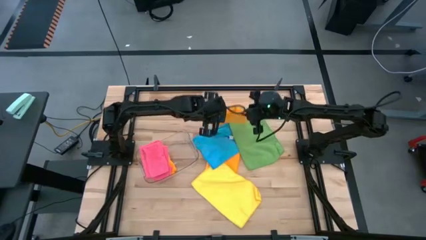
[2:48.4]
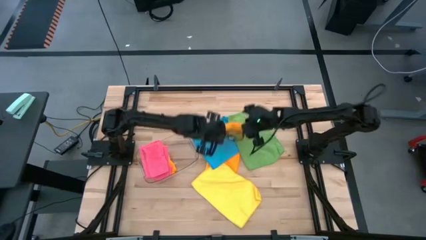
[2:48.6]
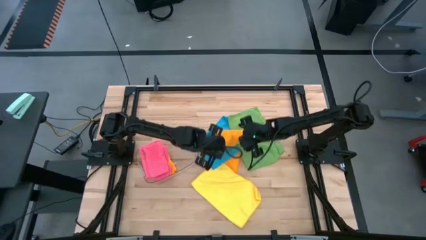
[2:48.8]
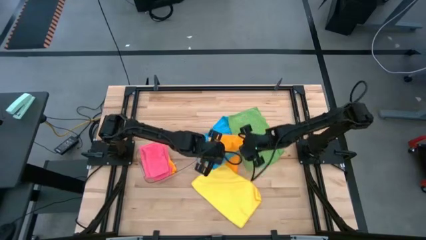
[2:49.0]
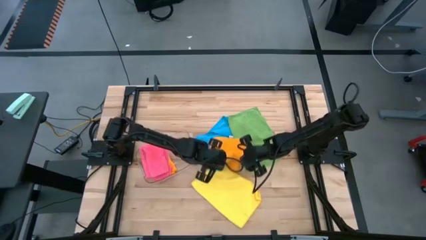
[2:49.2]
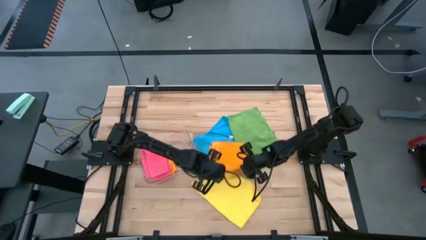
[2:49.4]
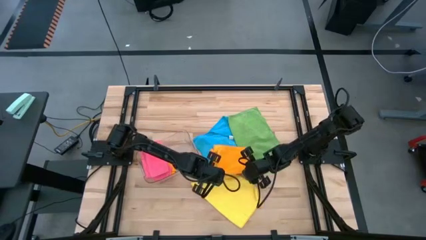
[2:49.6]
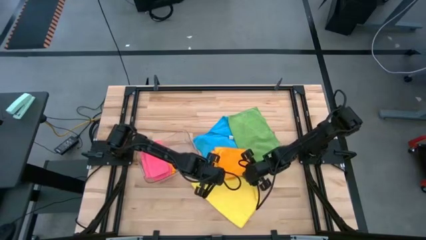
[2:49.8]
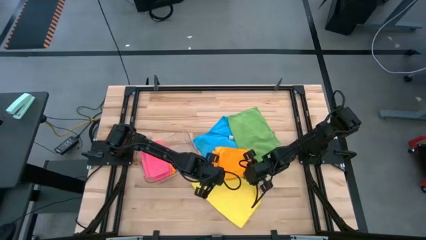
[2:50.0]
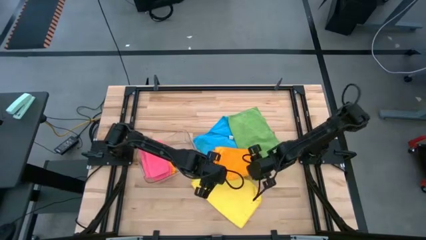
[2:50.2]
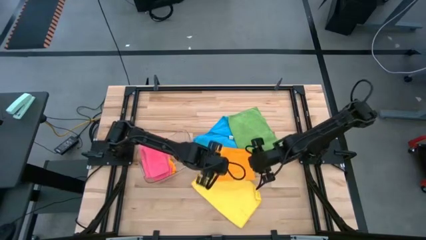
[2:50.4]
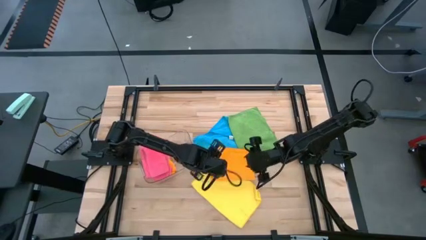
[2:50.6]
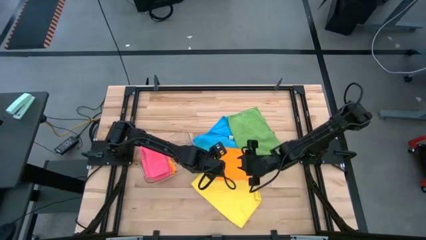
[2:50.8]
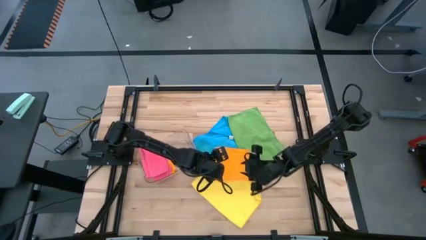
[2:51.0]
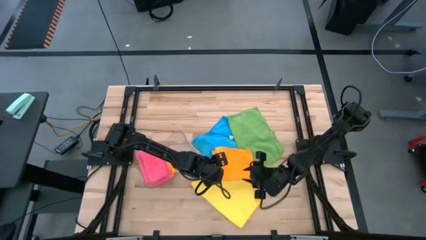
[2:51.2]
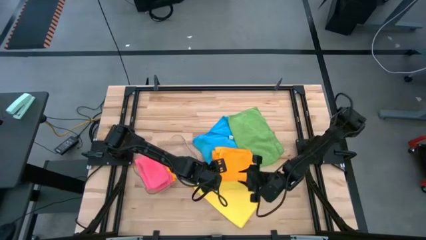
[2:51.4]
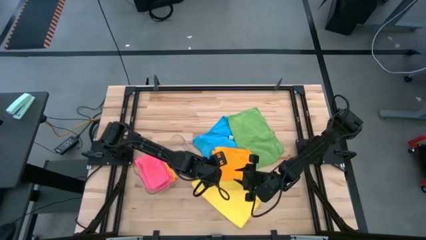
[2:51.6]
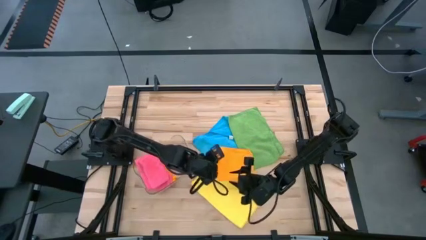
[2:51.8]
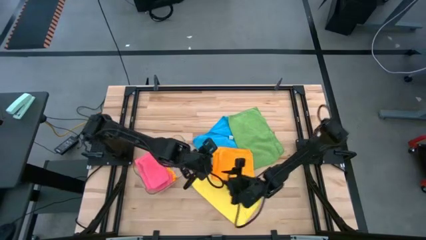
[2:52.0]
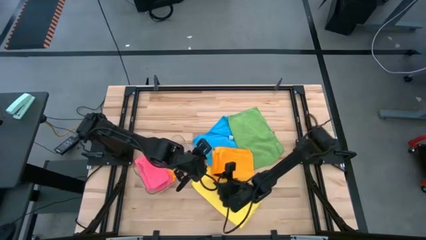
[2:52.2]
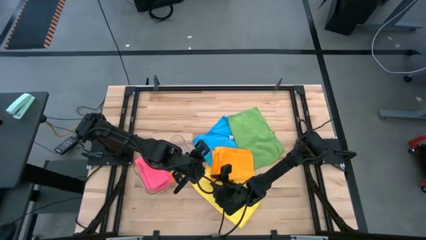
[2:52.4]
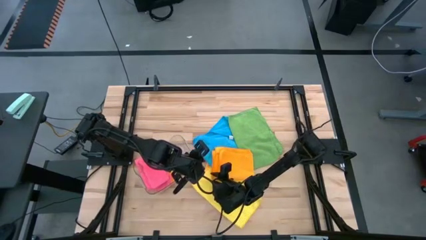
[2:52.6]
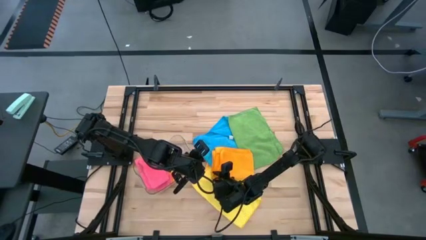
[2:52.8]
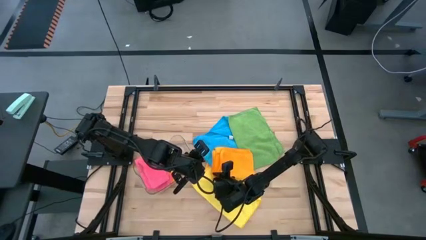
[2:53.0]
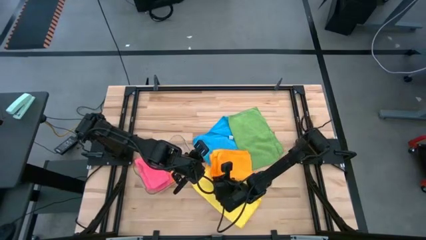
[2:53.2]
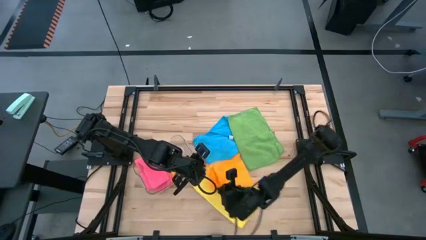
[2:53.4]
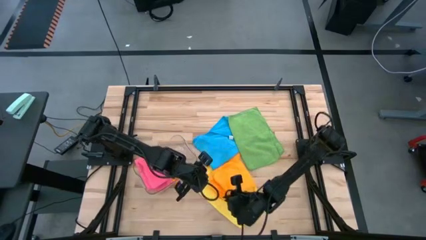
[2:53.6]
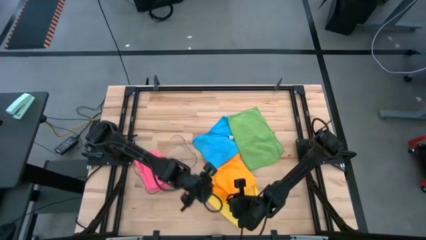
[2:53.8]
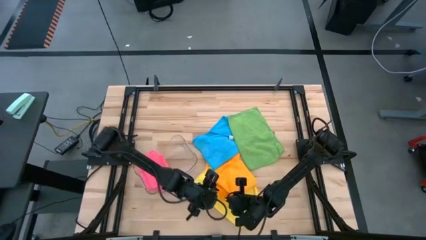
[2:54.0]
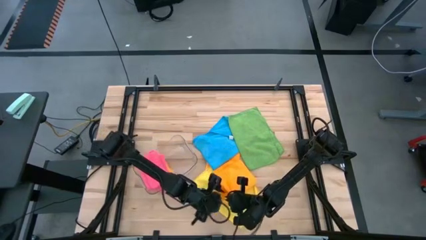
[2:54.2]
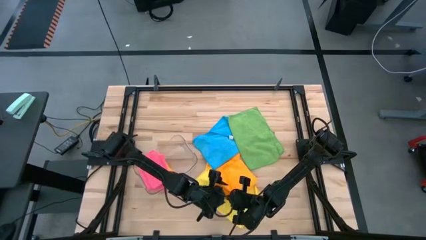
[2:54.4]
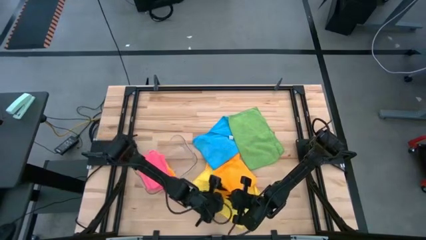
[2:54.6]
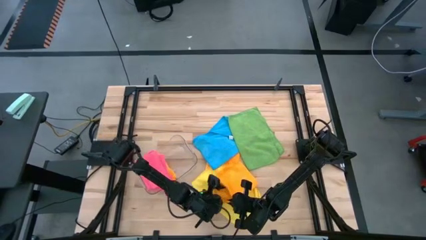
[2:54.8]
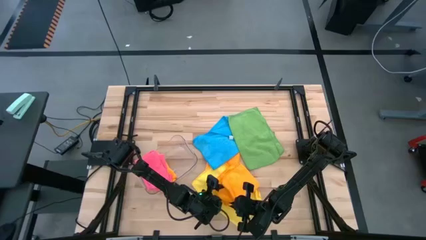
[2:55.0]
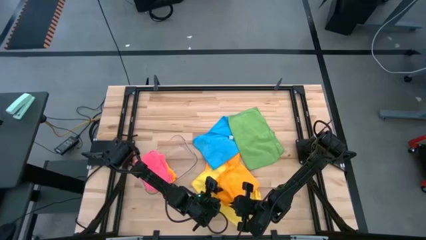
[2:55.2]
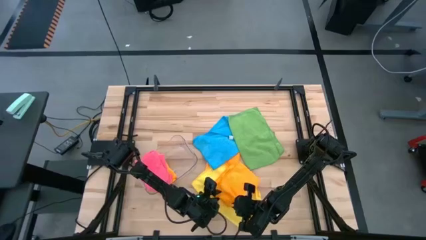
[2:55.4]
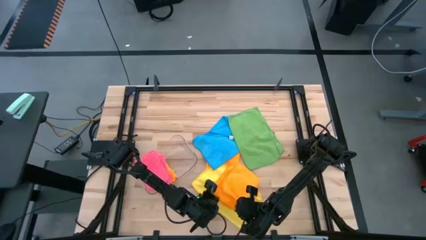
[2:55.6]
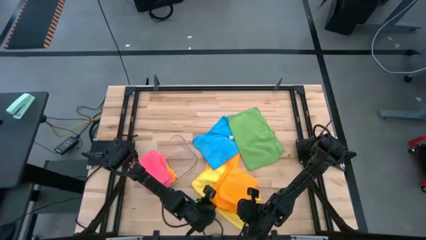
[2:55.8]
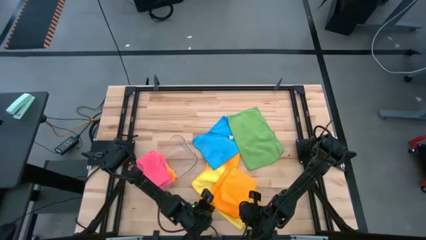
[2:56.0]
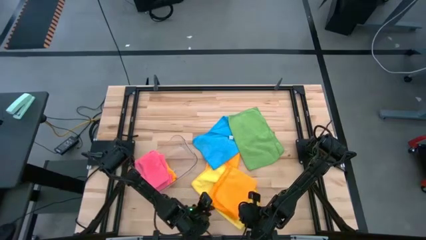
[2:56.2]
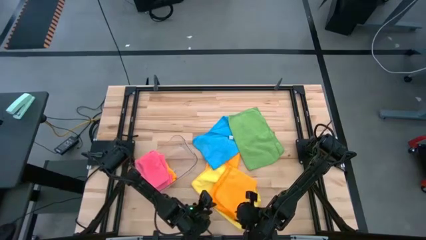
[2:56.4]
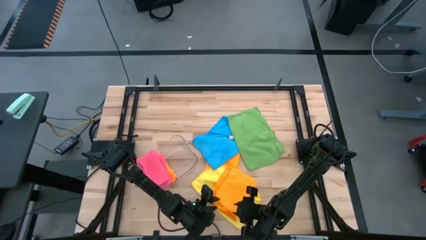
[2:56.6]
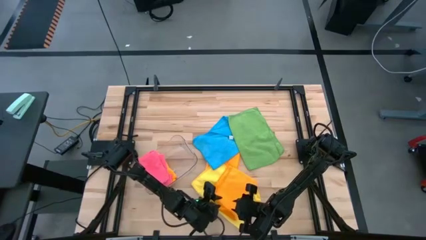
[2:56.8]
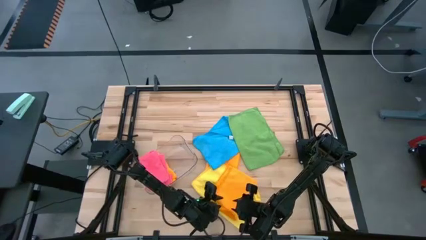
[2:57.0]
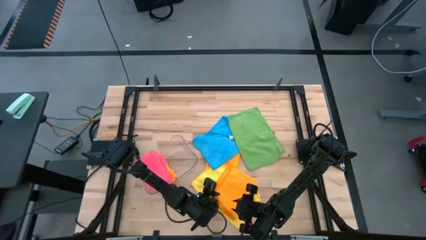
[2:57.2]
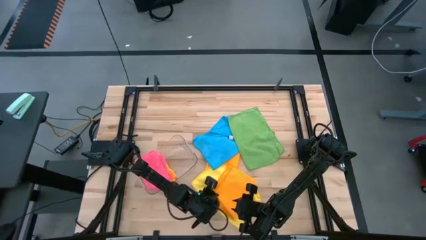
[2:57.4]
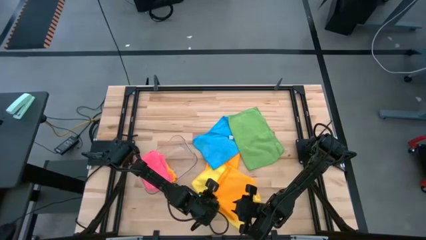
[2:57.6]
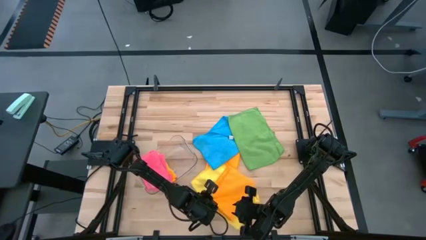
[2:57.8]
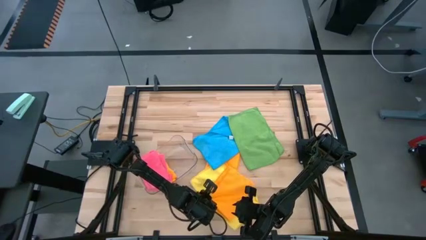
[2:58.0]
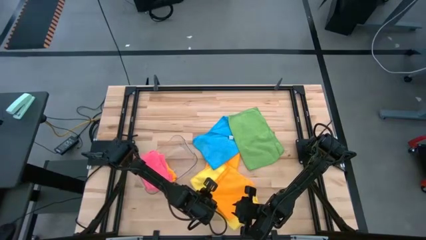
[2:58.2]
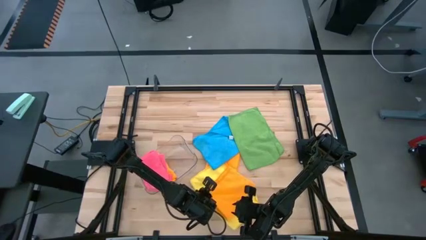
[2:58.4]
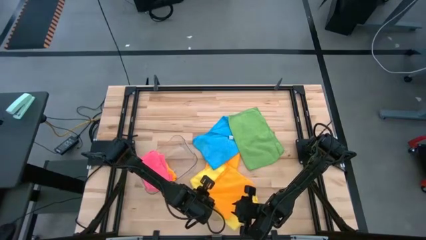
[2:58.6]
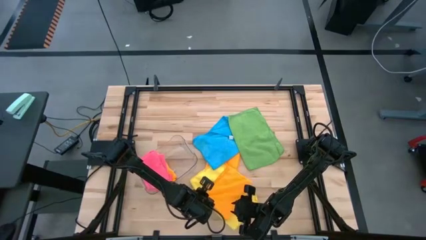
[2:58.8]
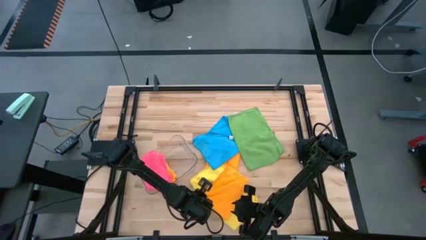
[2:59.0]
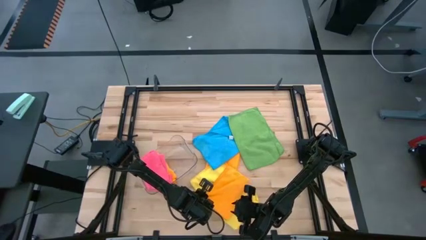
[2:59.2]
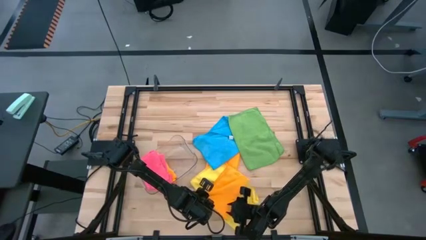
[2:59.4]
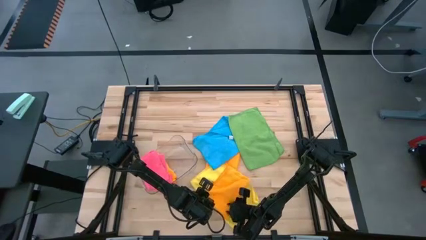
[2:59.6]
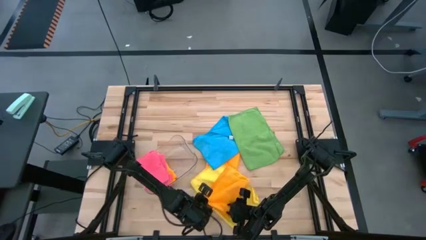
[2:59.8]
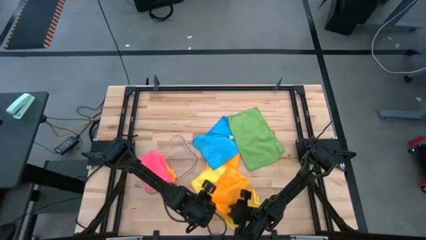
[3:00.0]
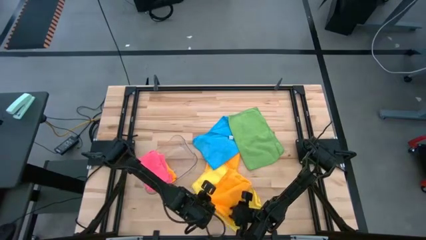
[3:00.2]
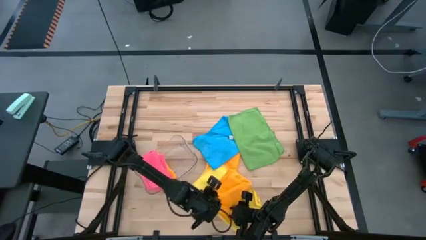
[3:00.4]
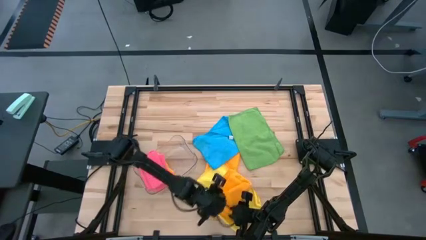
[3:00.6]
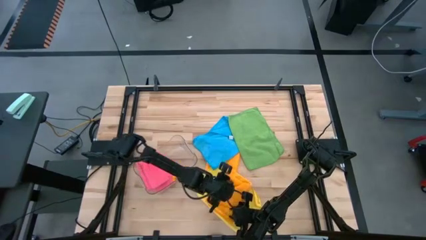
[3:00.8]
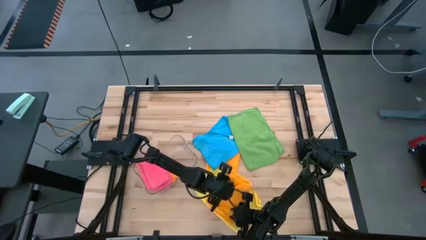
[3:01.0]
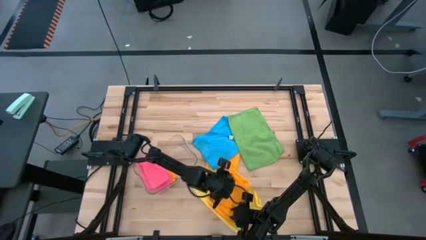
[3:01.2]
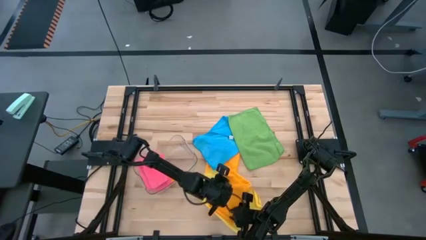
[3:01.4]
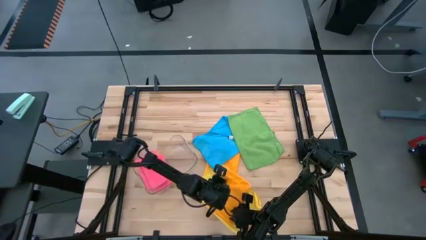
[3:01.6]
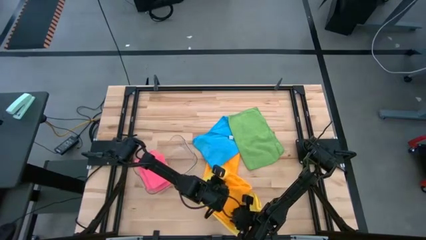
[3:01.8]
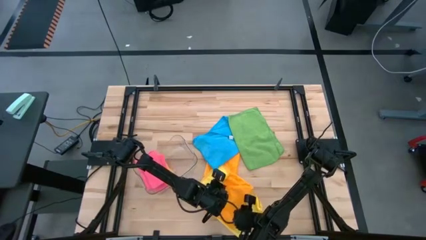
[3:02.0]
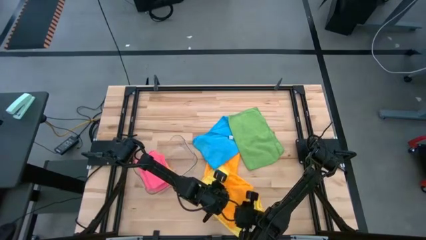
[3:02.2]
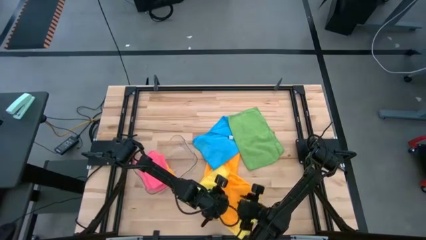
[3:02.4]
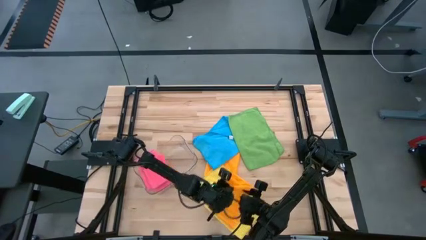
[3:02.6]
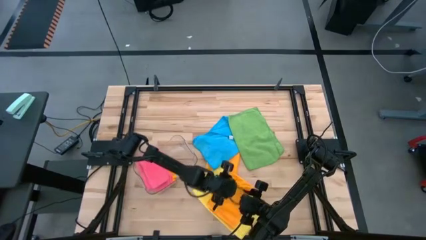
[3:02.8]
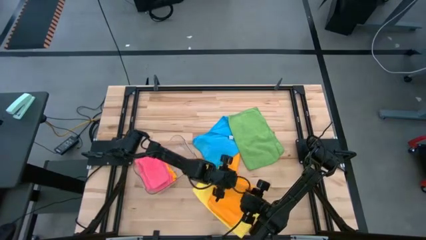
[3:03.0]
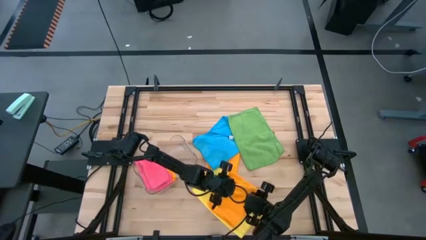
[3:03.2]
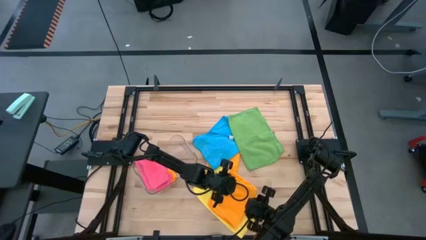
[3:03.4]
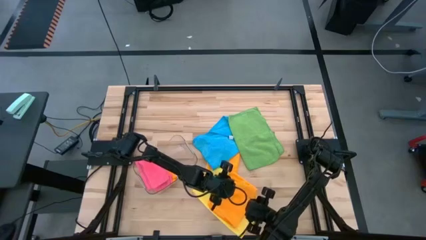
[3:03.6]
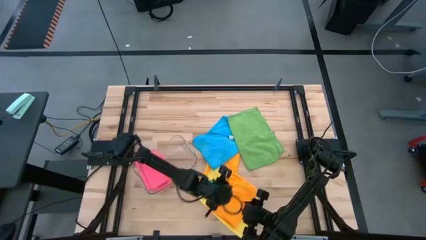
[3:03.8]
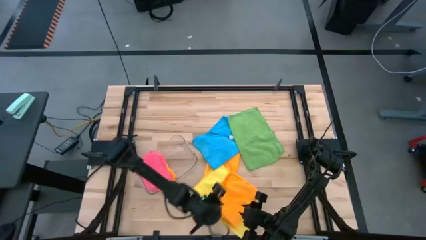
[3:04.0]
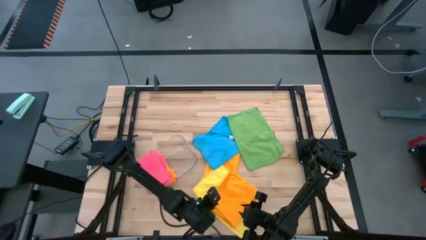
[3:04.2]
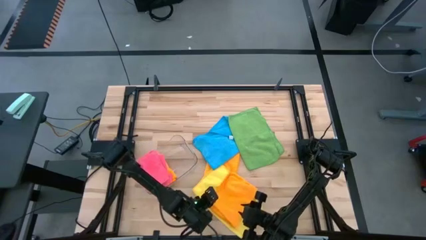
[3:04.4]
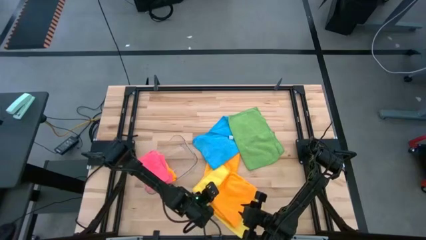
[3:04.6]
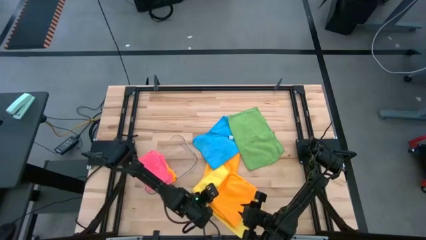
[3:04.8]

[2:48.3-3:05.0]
Task: Fold microfiber towels
Fold the right orange microfiber cloth and put it into the transparent bin
